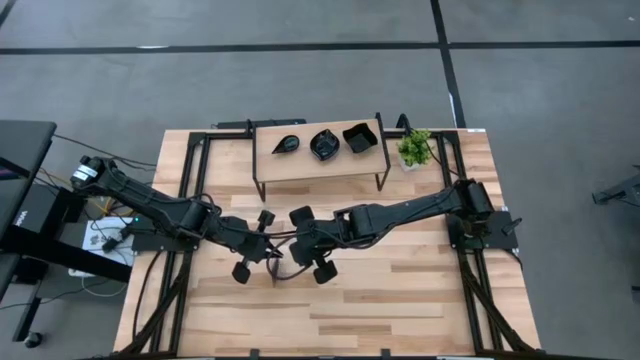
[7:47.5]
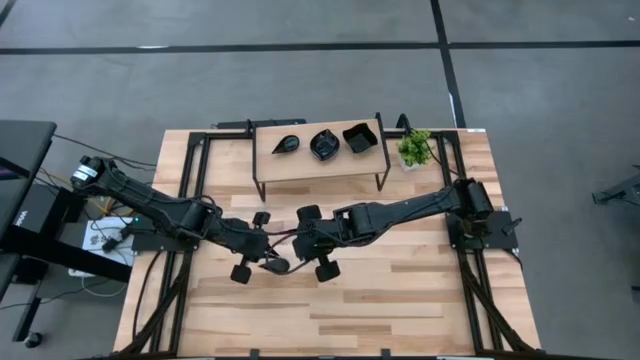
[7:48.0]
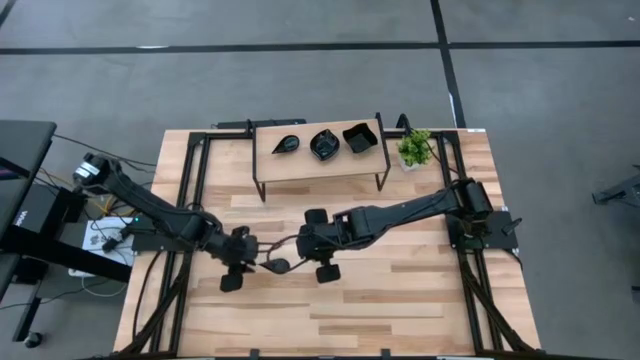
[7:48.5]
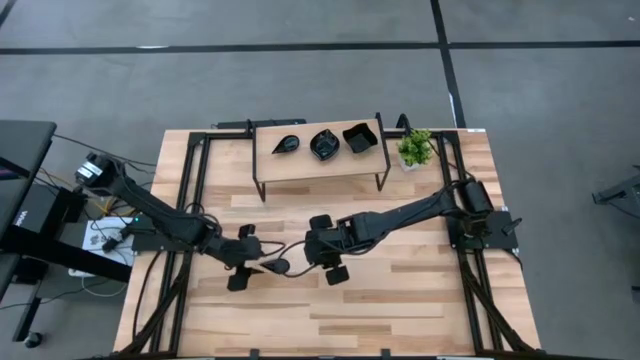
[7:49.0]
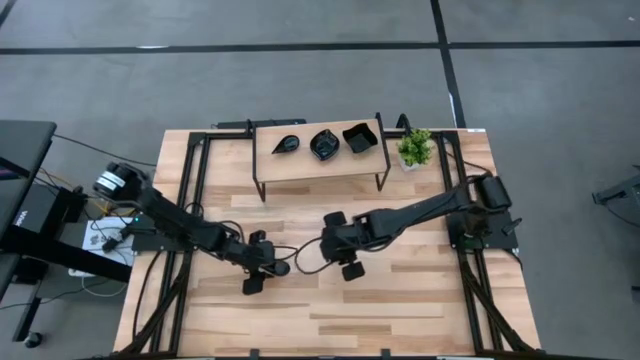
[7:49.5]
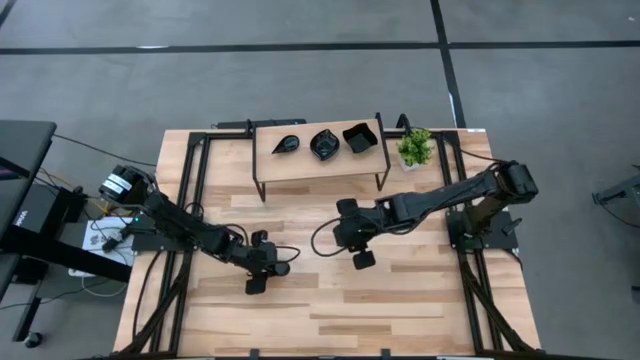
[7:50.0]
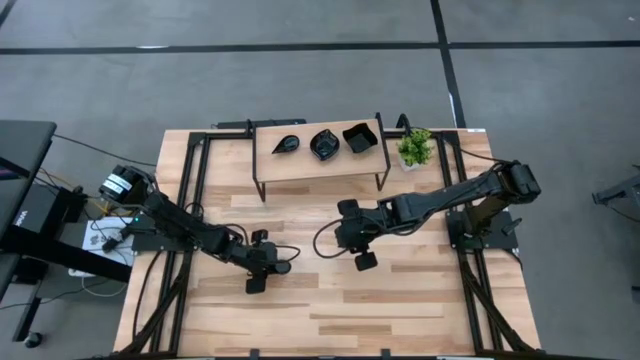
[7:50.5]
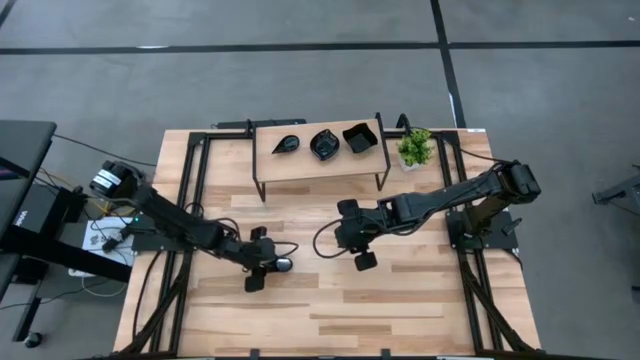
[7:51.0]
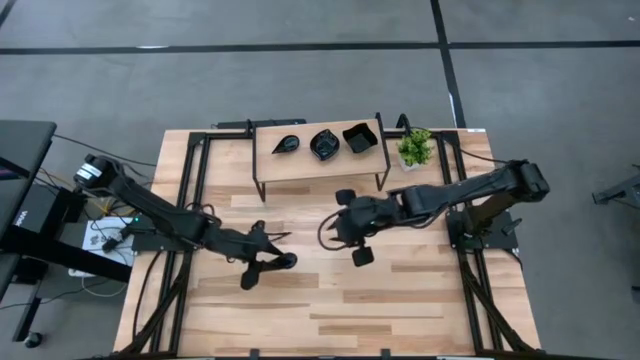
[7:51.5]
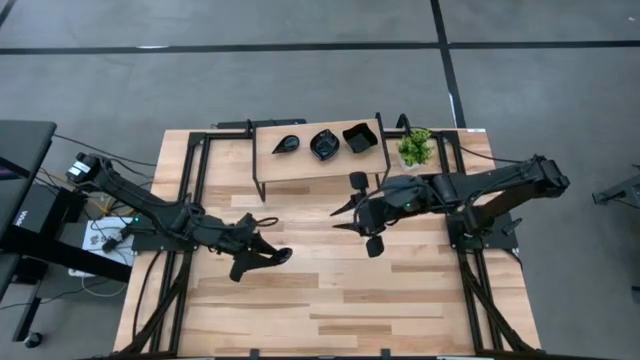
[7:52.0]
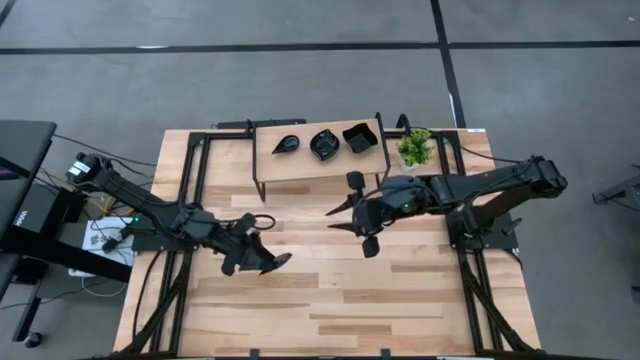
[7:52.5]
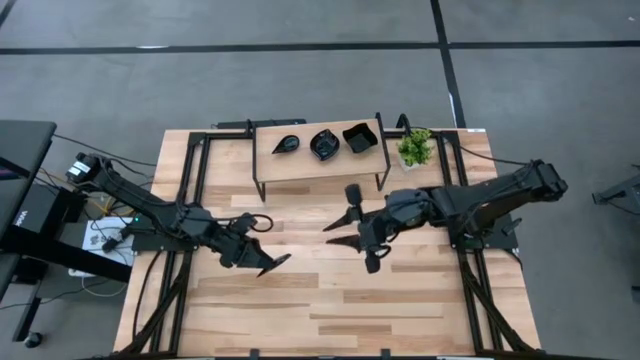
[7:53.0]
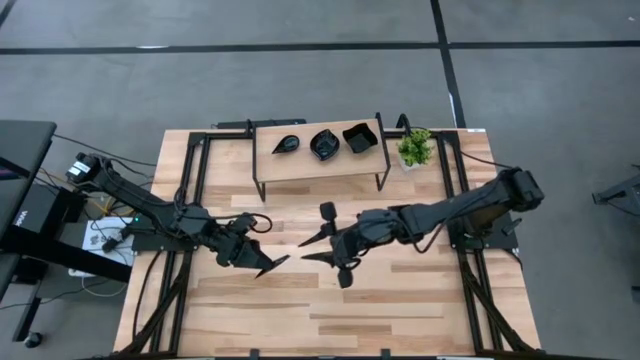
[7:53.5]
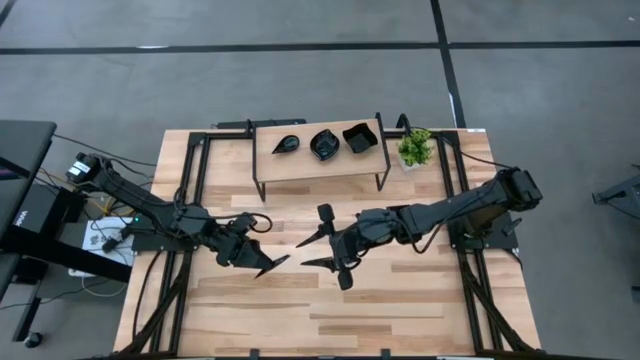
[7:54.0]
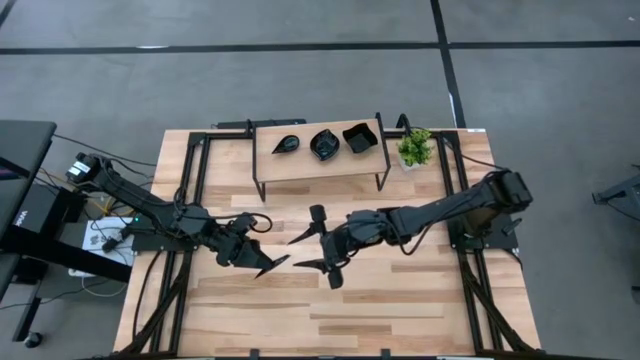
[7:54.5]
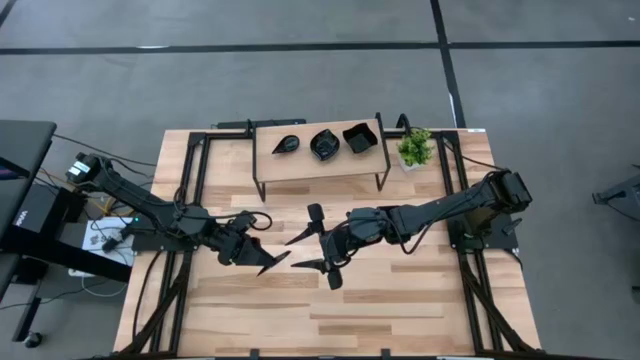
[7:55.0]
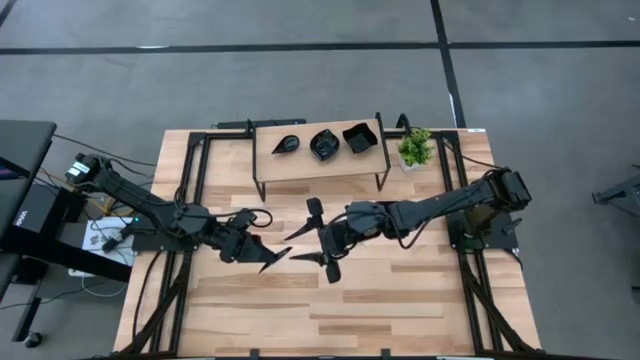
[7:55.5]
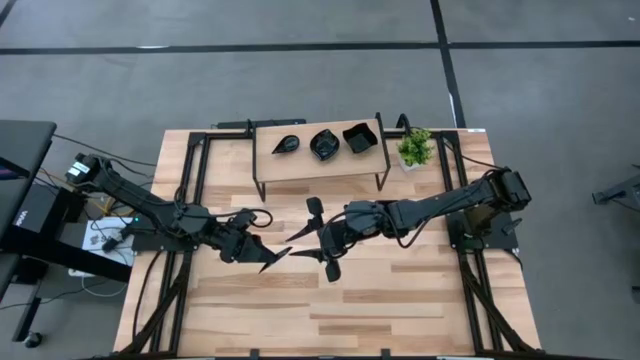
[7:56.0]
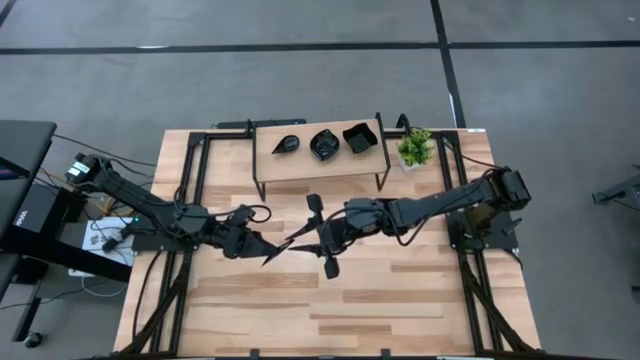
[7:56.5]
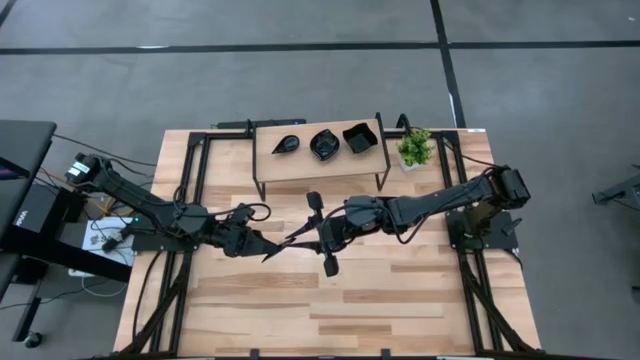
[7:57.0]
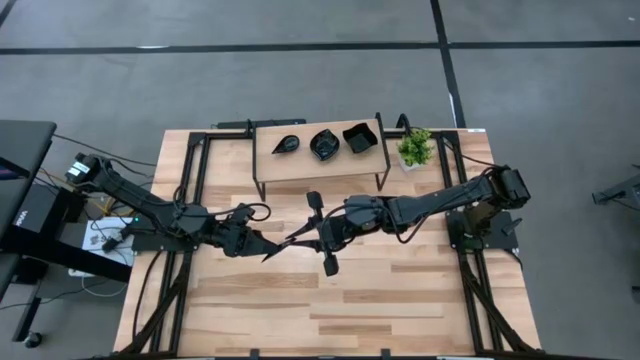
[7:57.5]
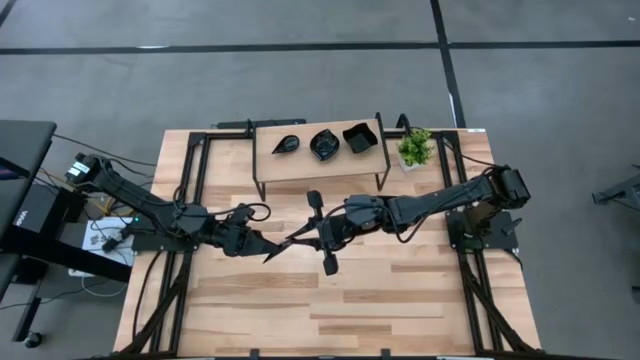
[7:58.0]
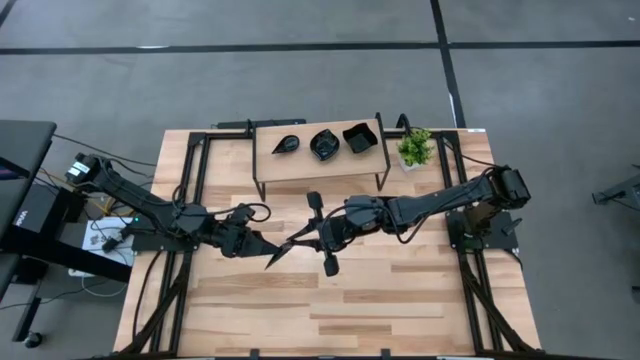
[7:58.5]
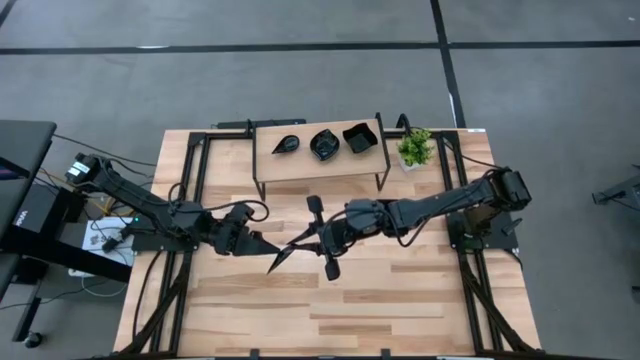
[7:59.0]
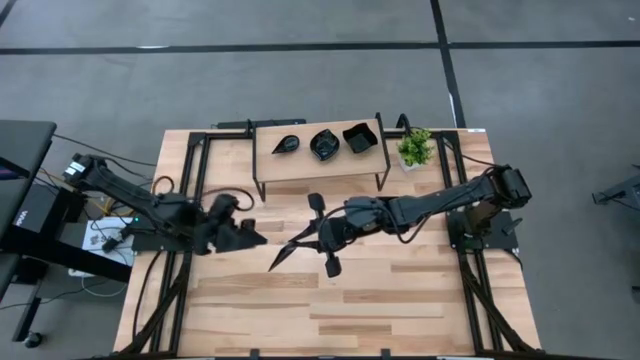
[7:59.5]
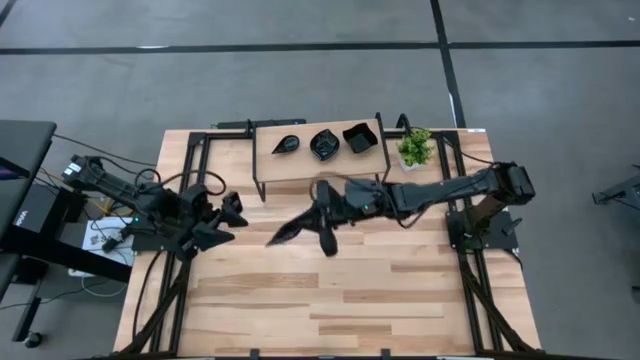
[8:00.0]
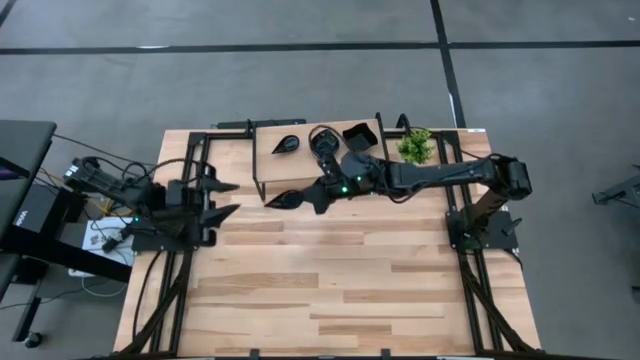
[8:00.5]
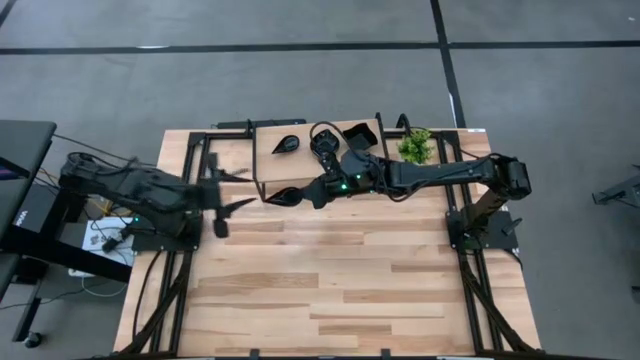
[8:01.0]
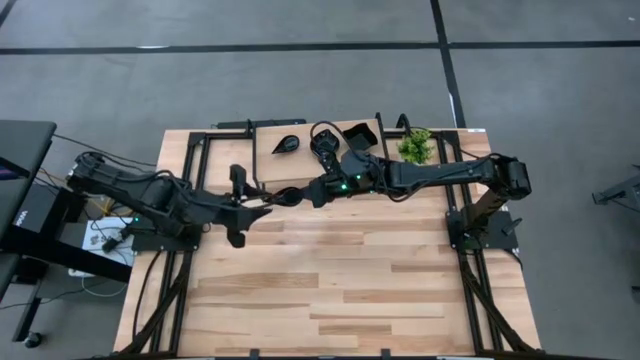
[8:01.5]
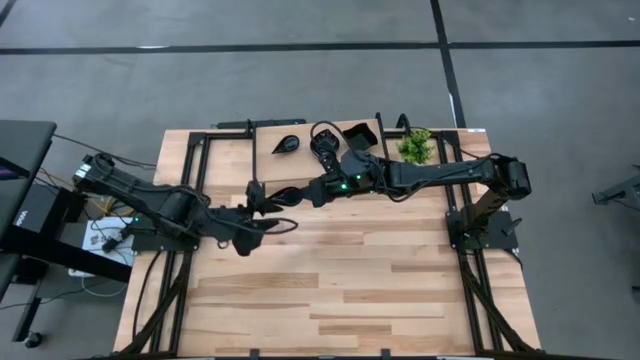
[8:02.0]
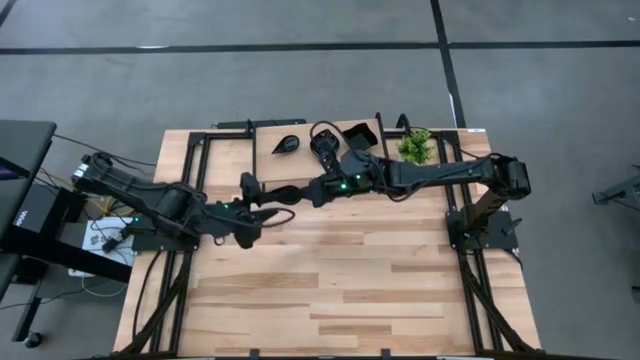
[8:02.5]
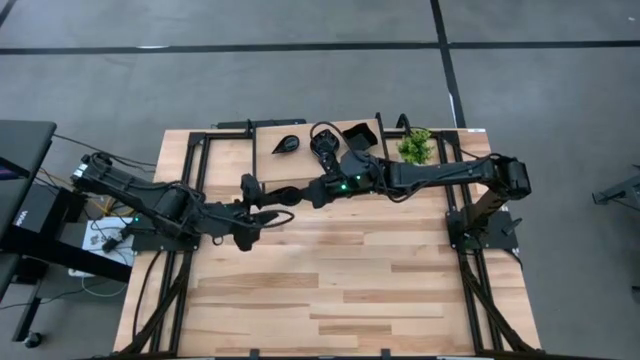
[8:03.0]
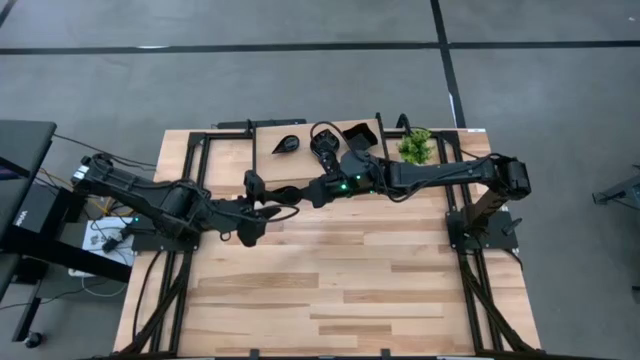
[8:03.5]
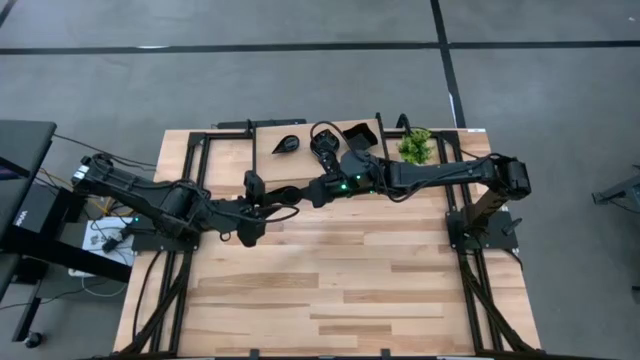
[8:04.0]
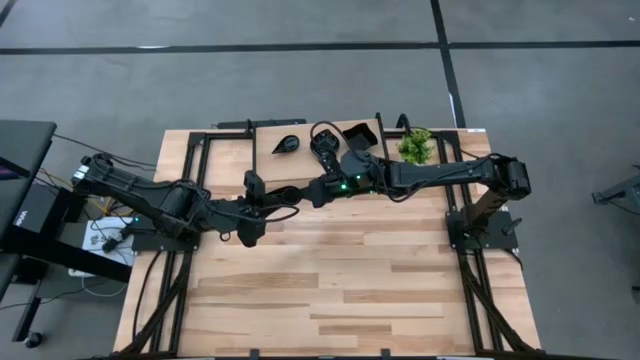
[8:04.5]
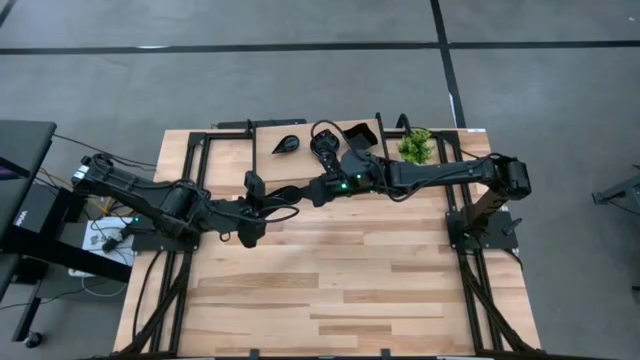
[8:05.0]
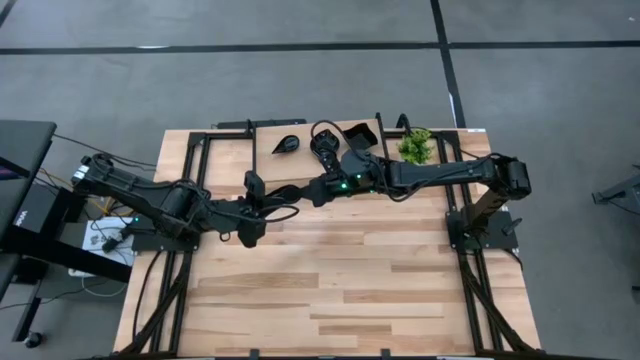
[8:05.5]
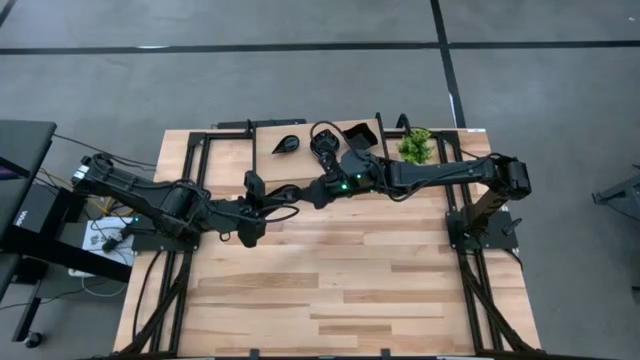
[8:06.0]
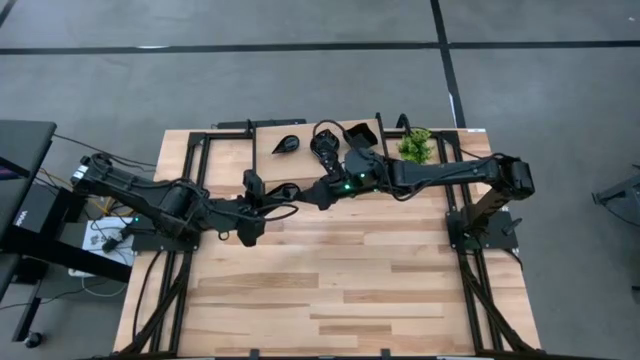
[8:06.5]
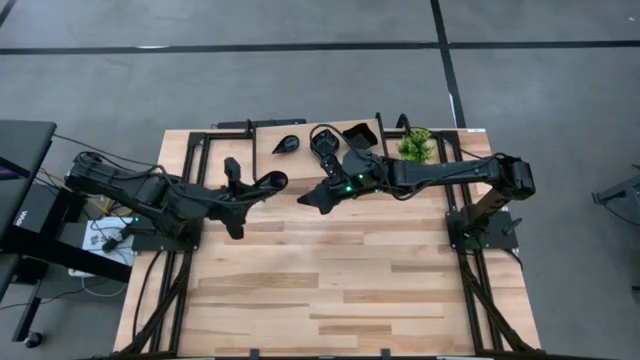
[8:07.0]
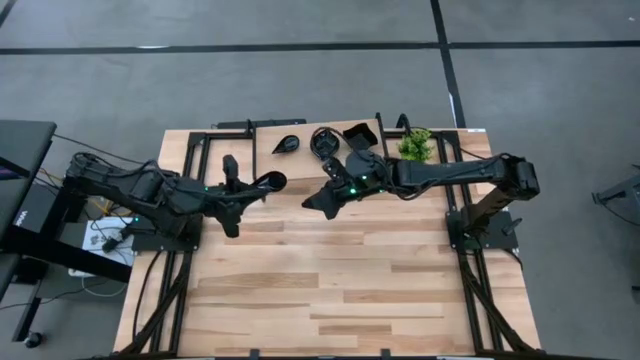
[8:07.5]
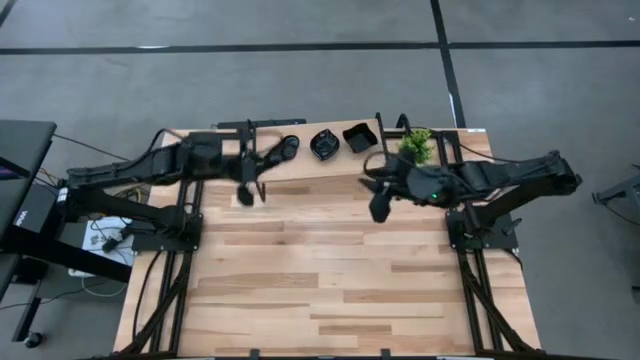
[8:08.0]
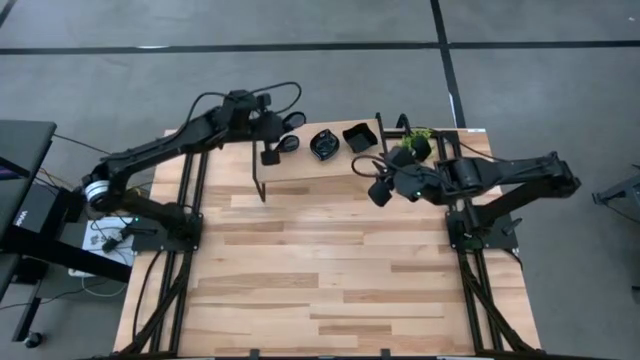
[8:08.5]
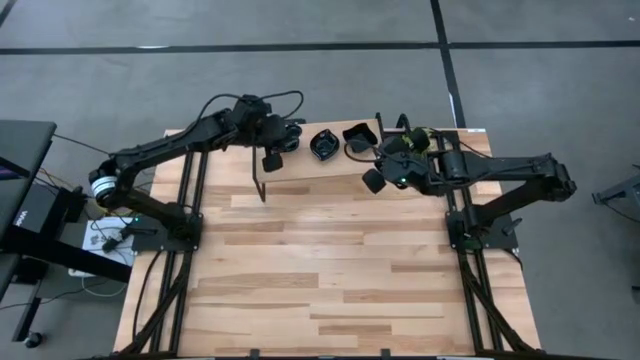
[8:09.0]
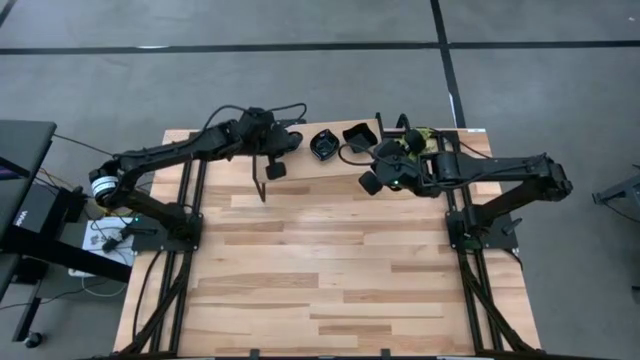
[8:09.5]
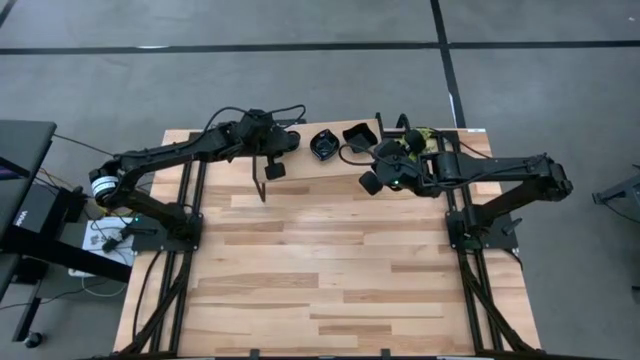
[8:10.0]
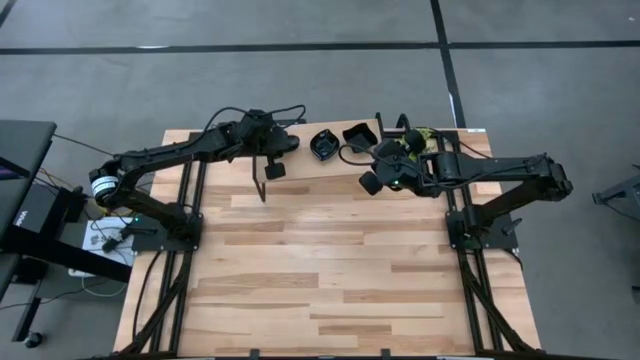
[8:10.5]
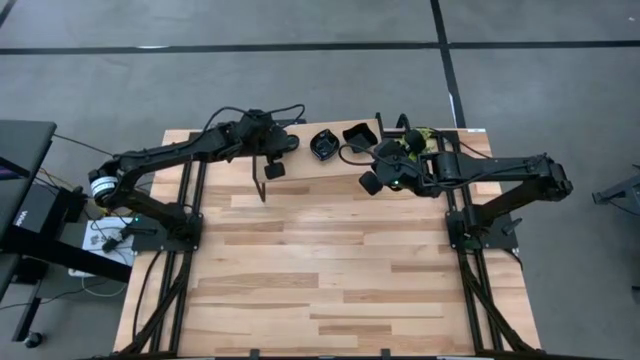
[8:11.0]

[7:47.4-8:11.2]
Task: Pick & Place Mini shaped plates
Stack the black drop shaped plate on the black drop shaped plate on the shelf
